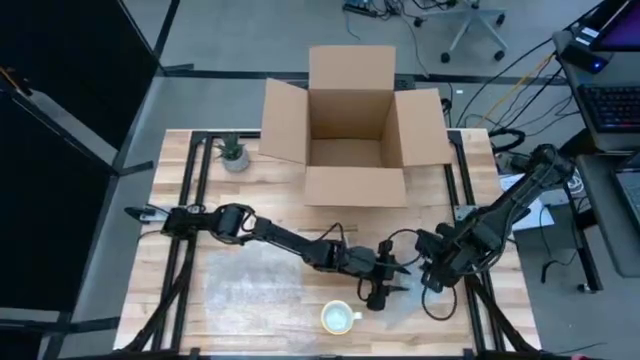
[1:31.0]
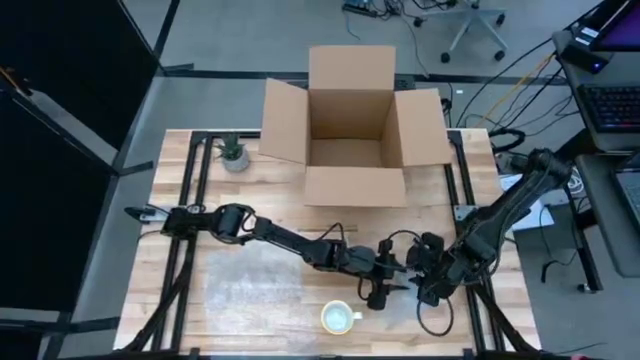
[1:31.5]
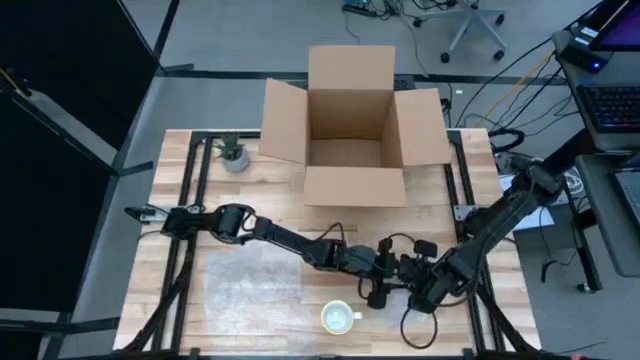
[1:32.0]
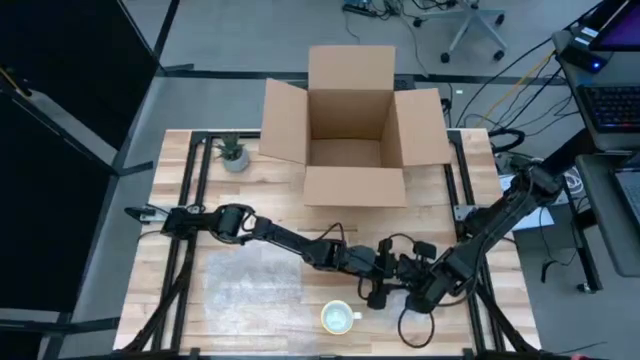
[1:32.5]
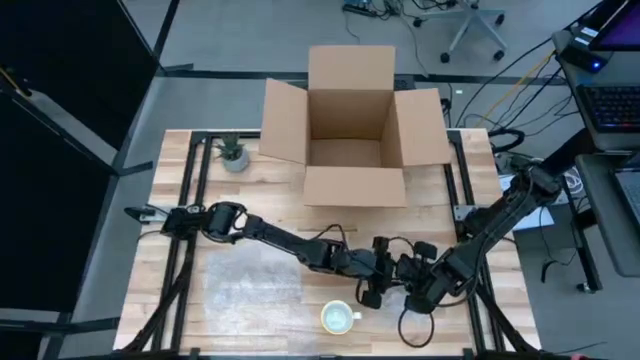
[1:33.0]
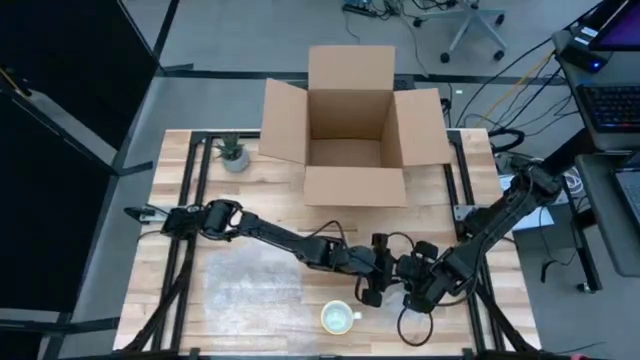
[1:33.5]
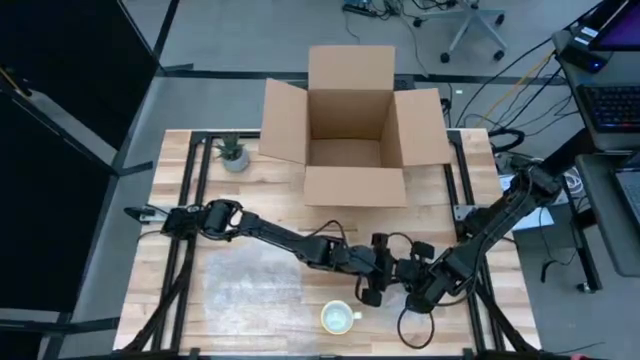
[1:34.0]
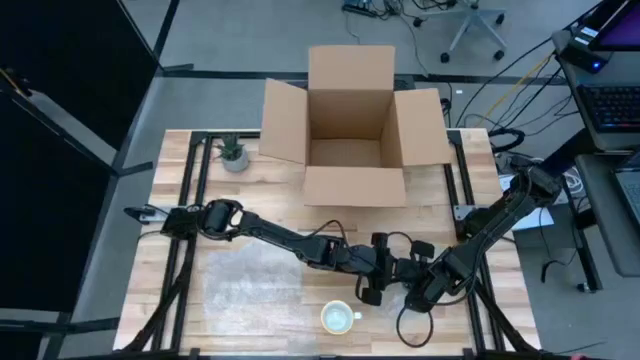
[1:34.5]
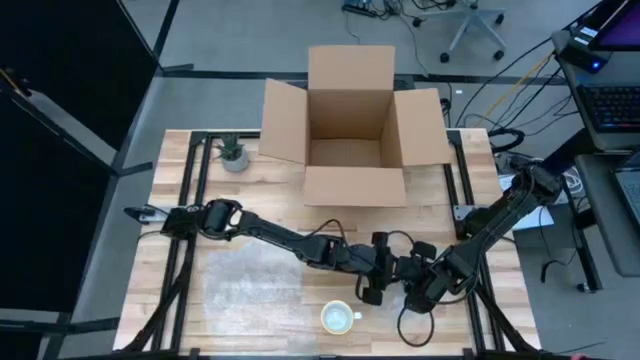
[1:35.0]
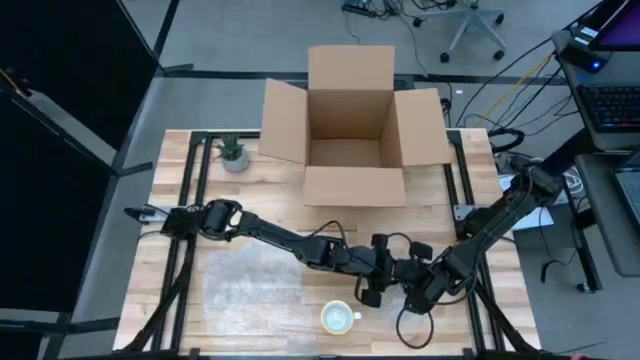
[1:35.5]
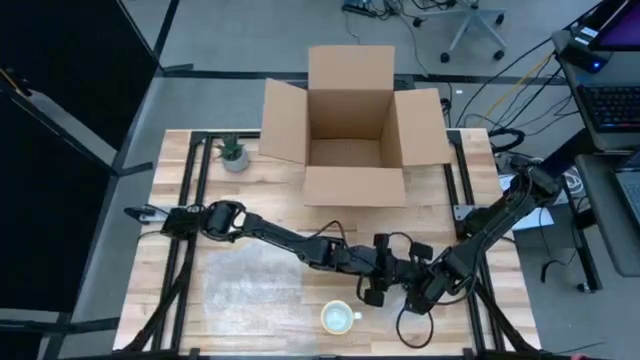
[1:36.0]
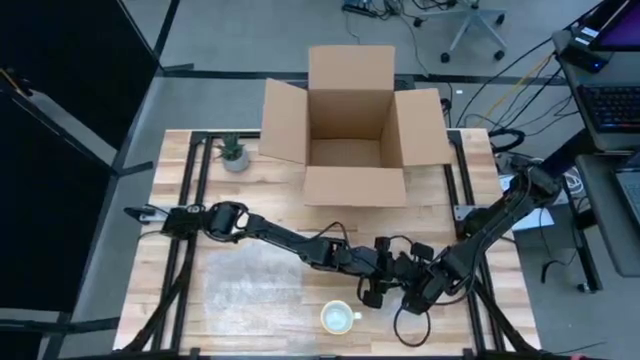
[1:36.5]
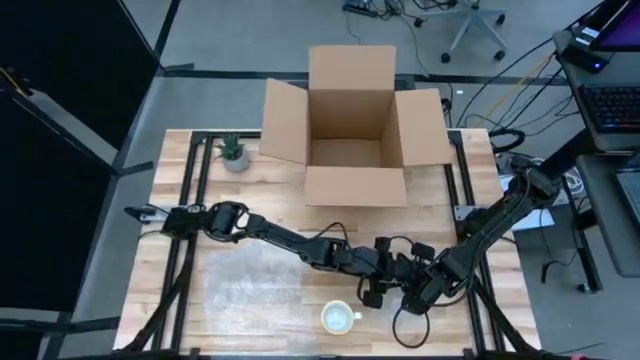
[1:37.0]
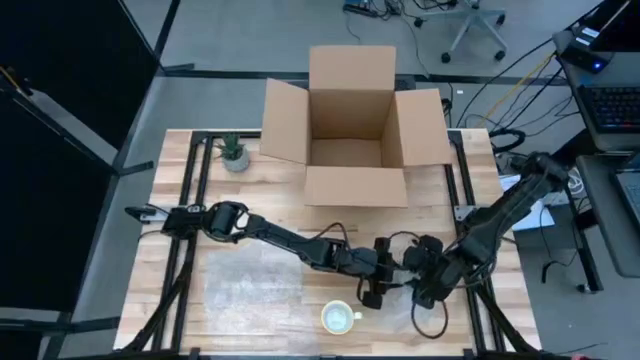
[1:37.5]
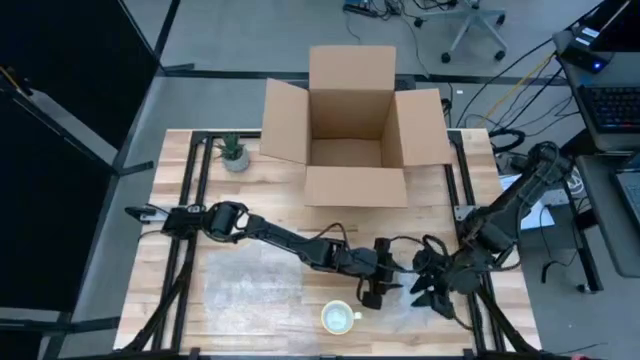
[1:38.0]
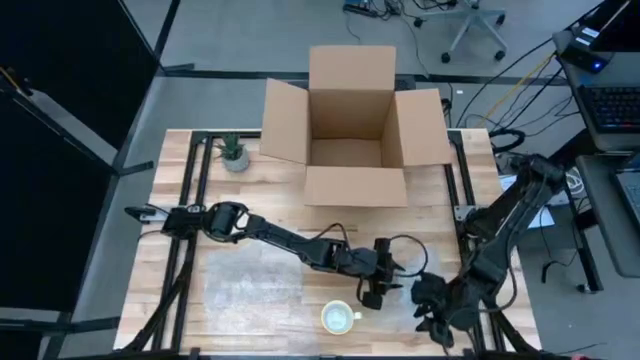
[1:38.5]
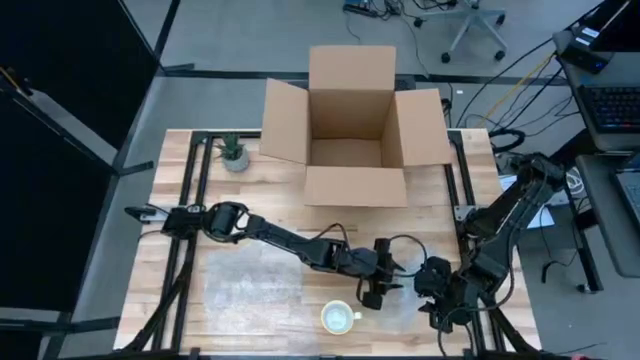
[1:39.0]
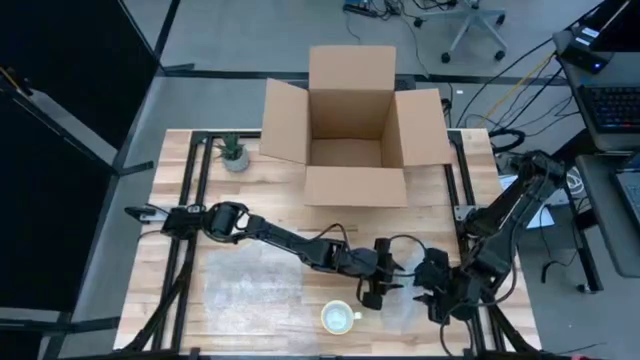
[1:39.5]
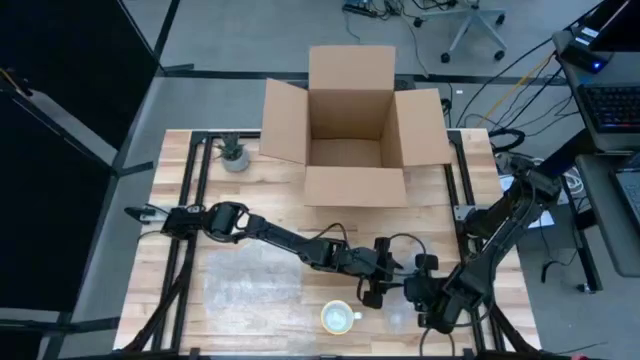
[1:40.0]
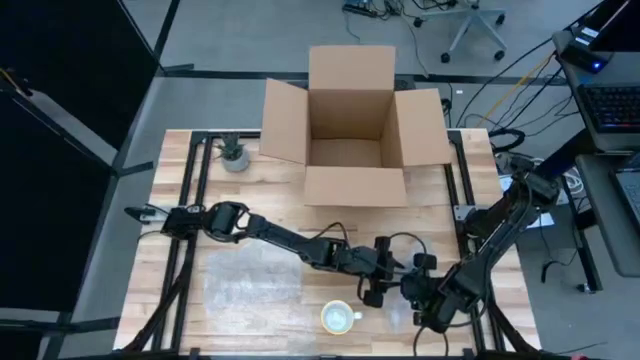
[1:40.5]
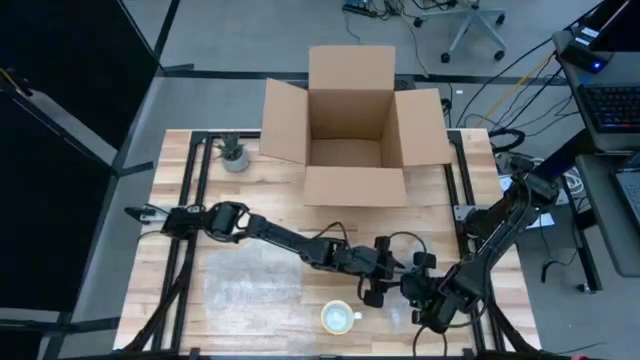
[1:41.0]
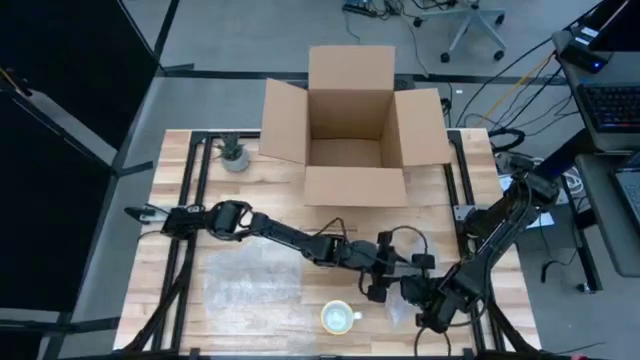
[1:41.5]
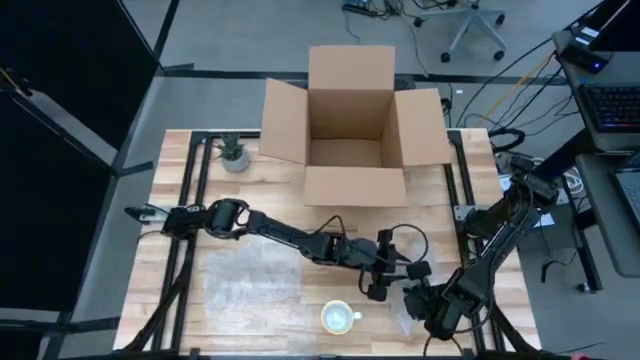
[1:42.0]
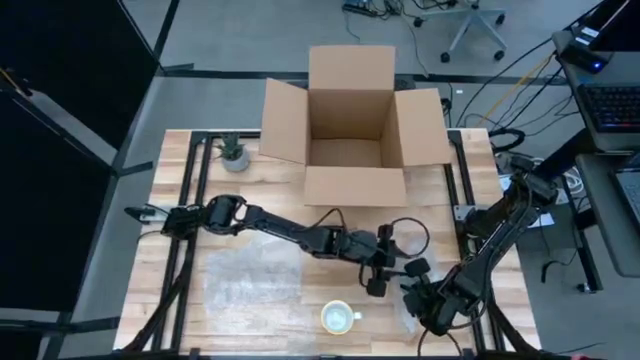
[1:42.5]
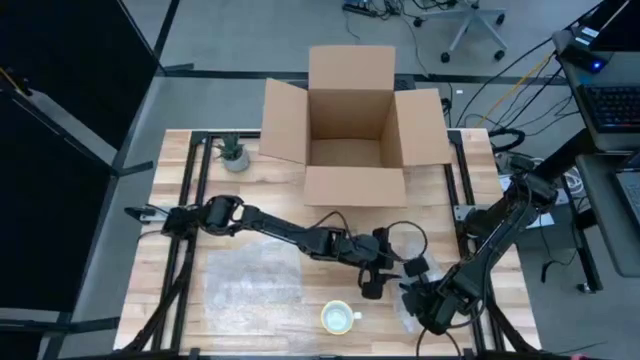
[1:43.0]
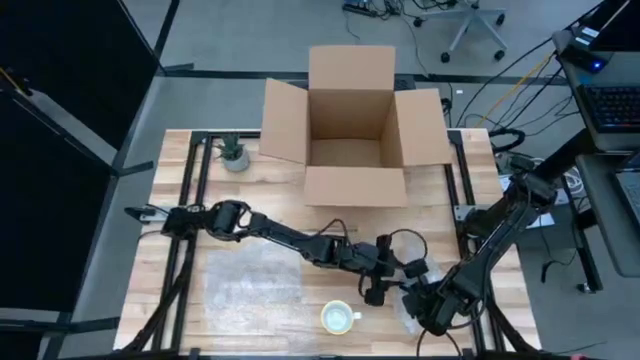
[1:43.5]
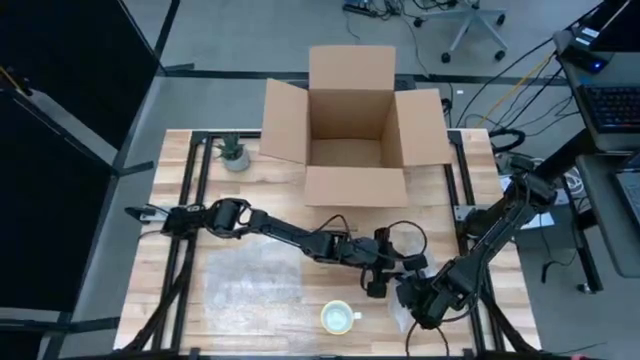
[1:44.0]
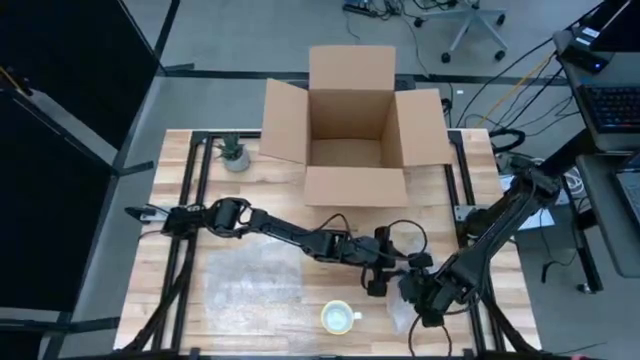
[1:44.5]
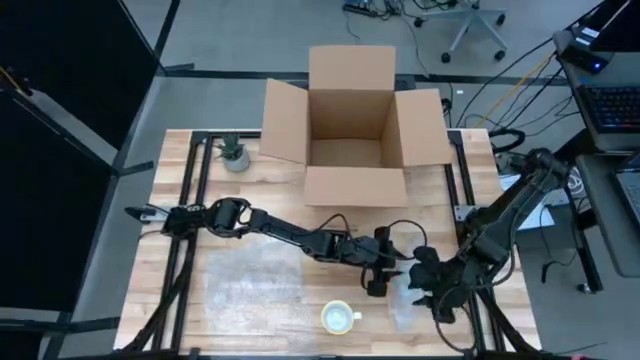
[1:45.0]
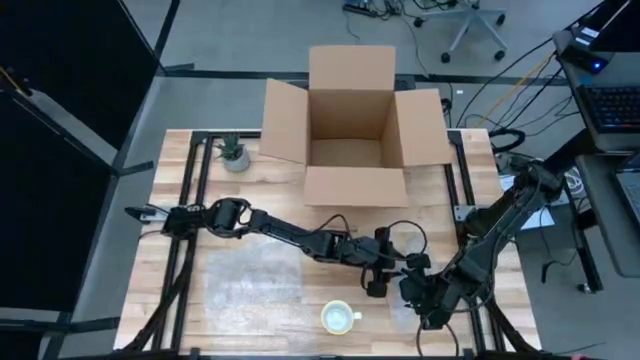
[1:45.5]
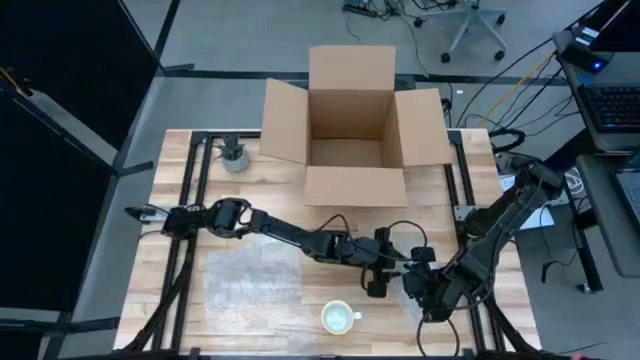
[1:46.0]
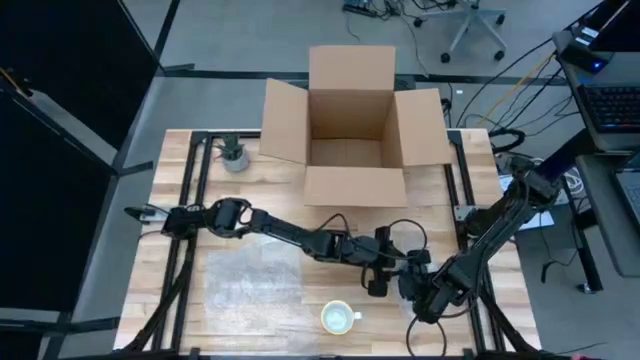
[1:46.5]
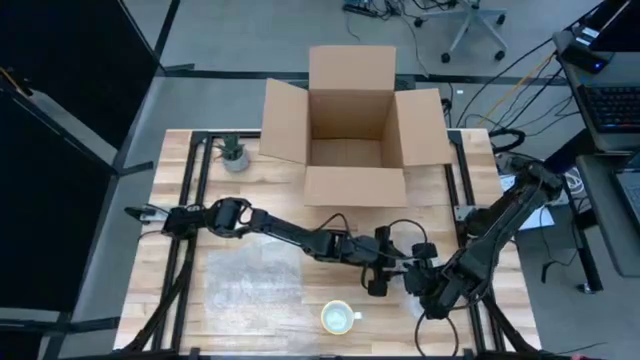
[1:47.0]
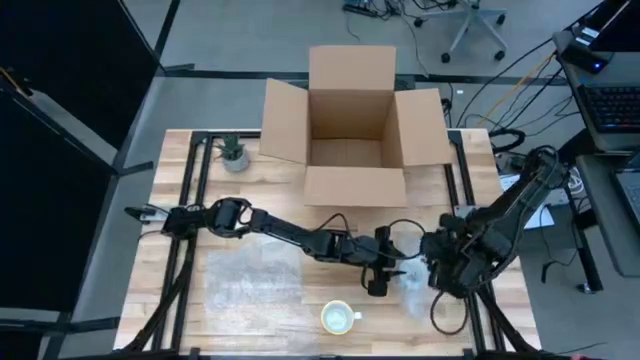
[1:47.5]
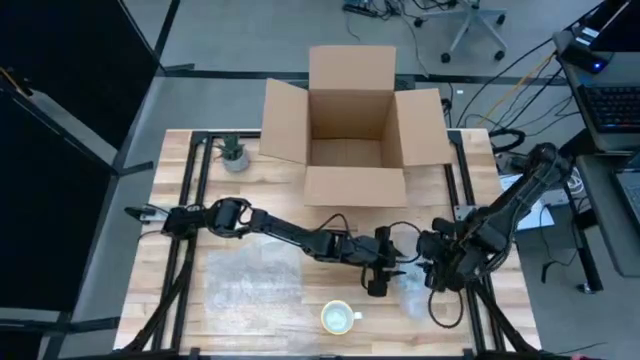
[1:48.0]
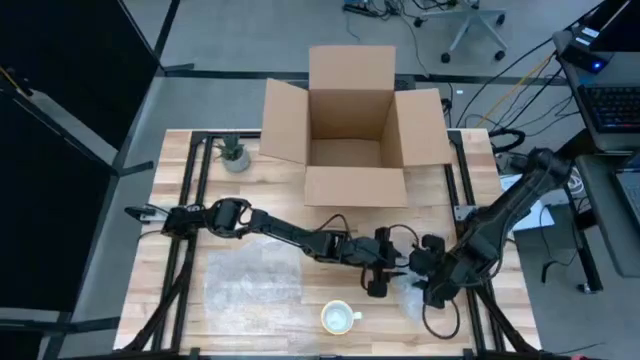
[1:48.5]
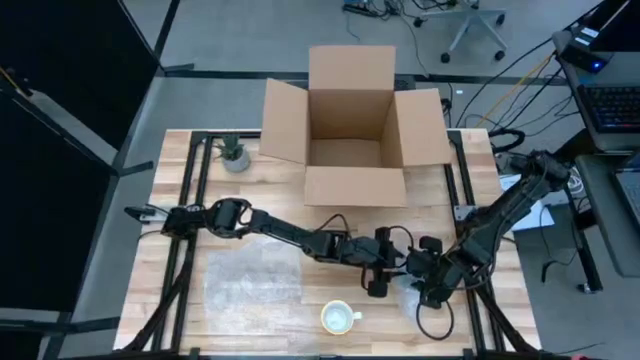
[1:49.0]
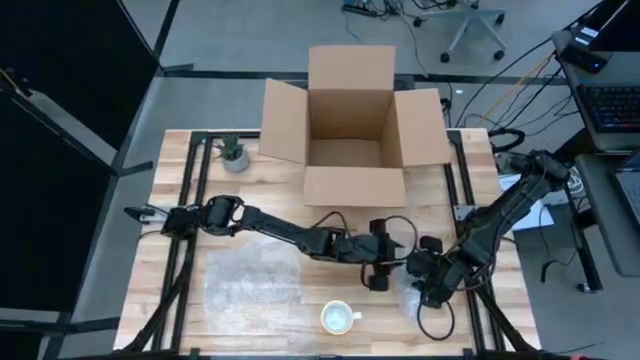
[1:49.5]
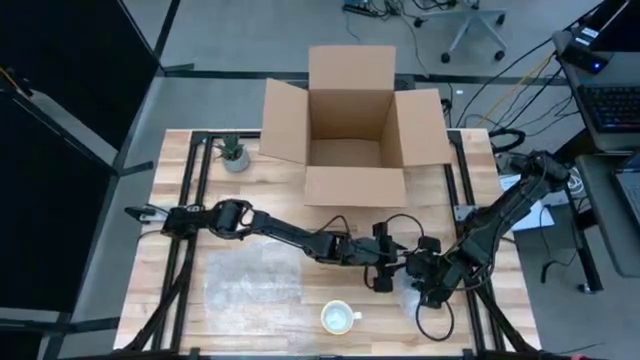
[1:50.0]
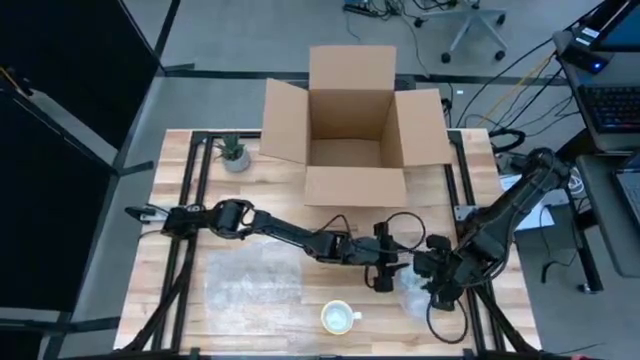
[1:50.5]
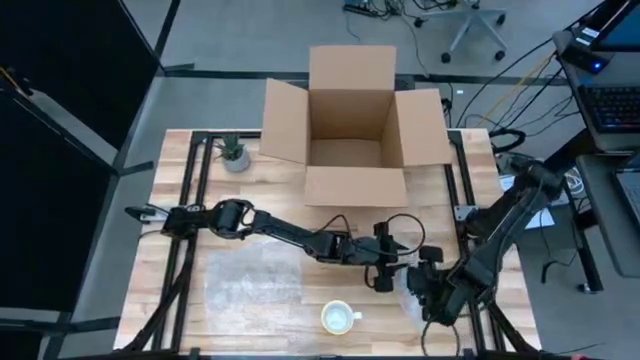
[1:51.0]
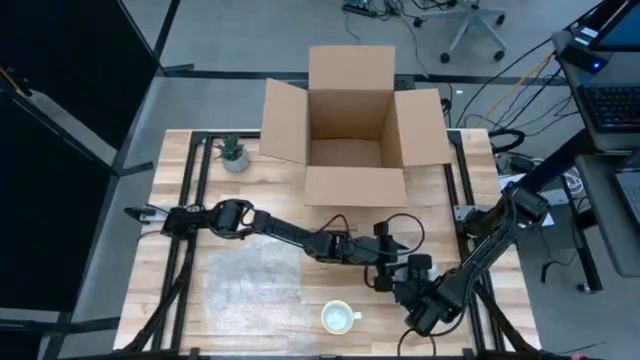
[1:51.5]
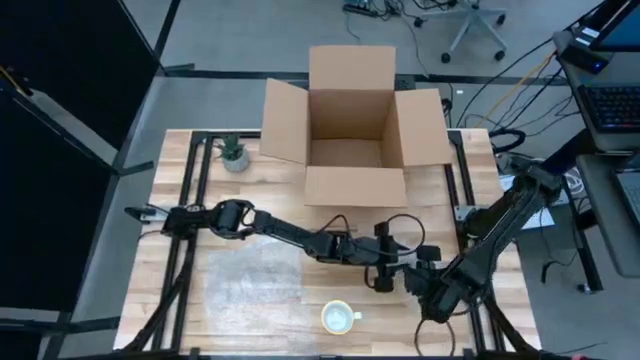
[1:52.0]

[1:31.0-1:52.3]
Task: wrap mug
Wrap the red patterned mug with bubble wrap

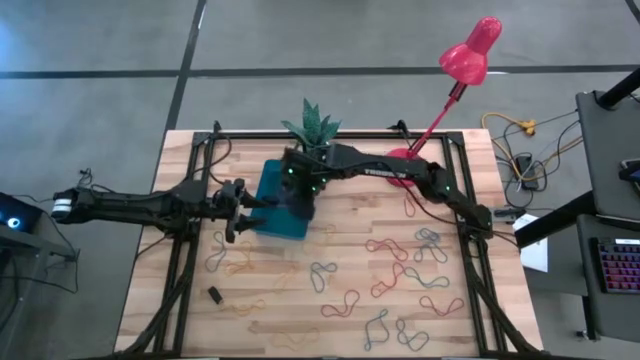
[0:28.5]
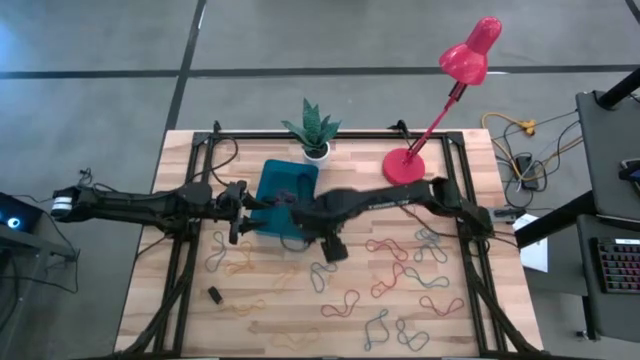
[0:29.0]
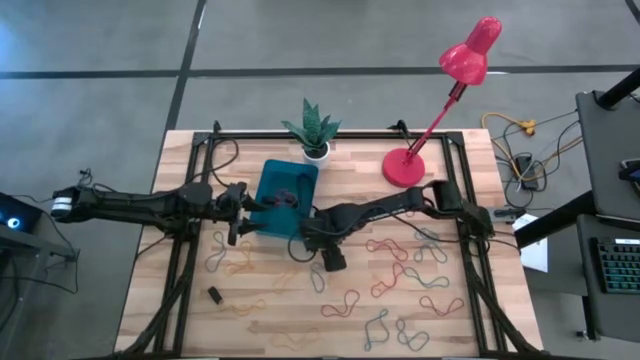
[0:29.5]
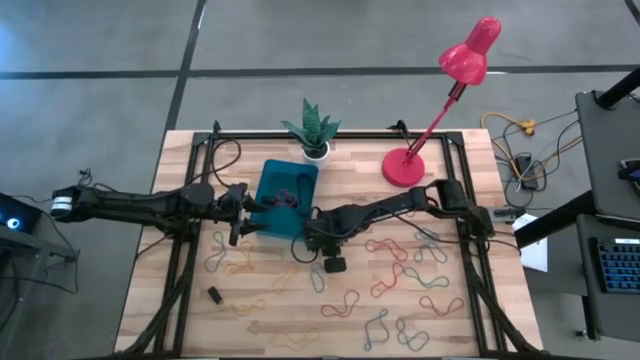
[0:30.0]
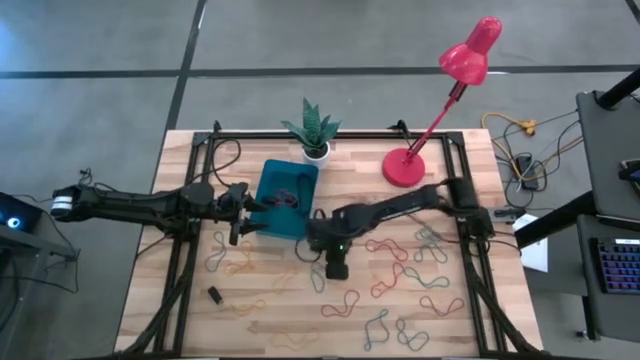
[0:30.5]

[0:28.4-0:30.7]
Task: Pick and place rubber bands into bin
Put the yellow rubber band into the blue bin
